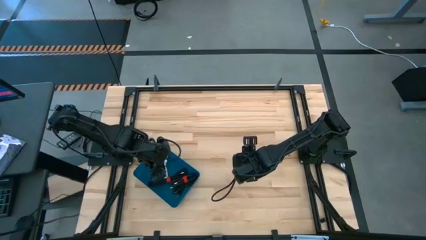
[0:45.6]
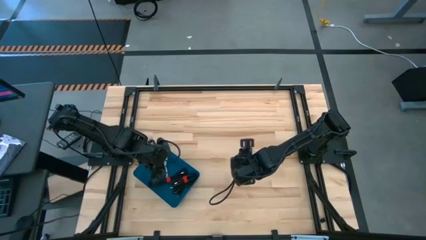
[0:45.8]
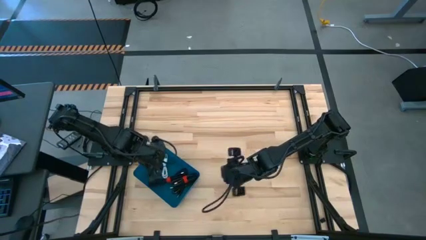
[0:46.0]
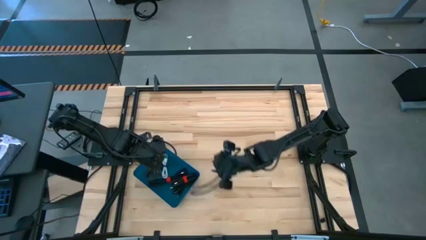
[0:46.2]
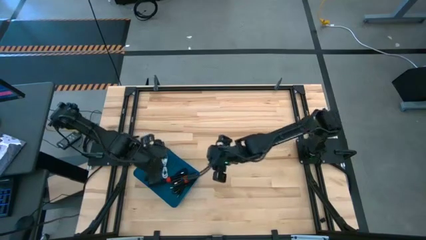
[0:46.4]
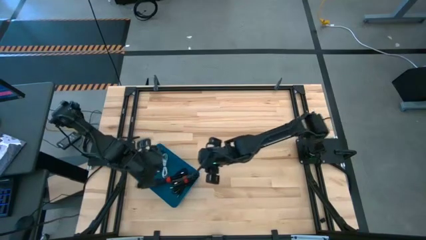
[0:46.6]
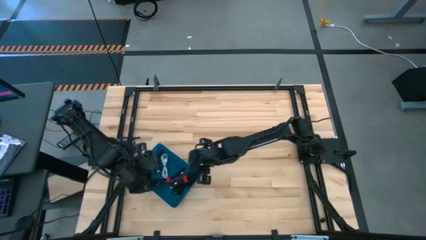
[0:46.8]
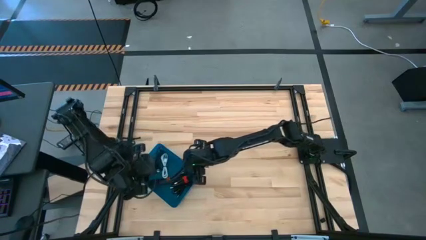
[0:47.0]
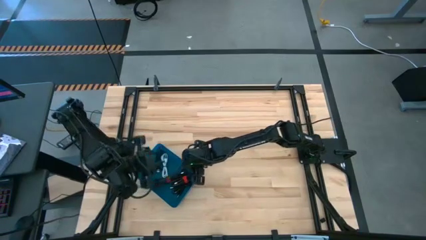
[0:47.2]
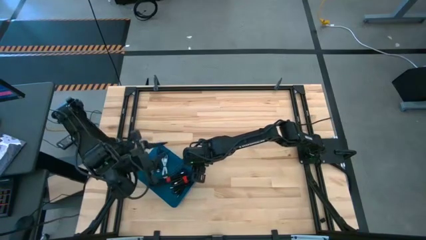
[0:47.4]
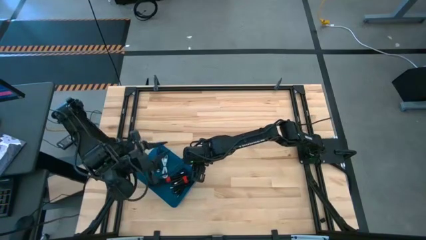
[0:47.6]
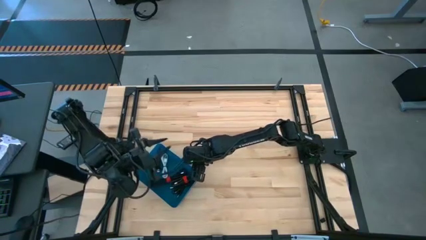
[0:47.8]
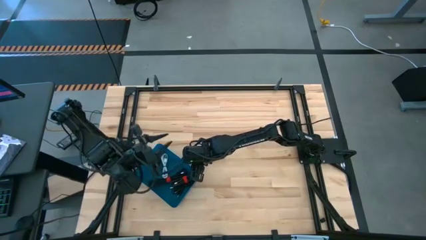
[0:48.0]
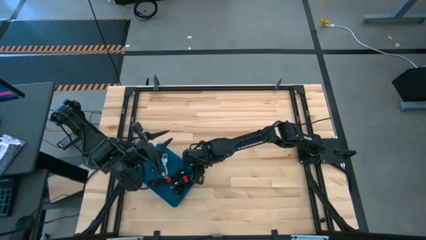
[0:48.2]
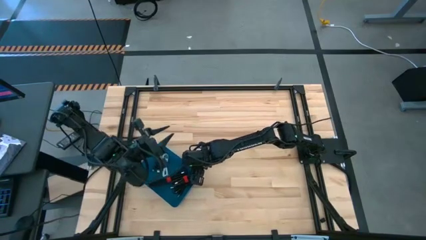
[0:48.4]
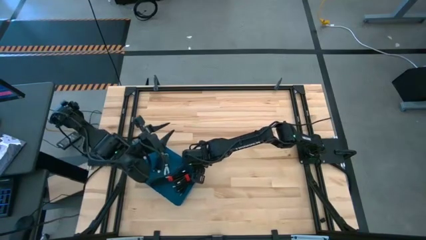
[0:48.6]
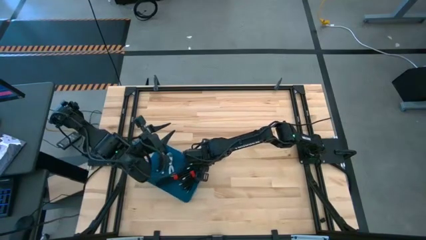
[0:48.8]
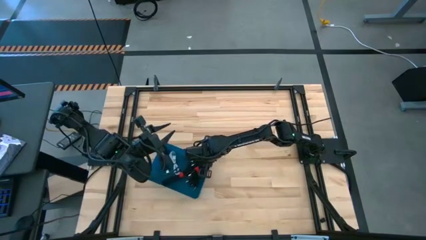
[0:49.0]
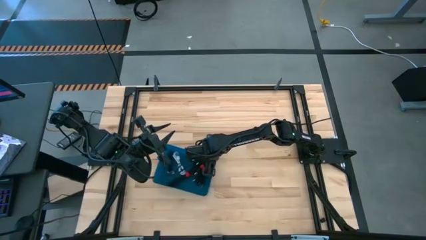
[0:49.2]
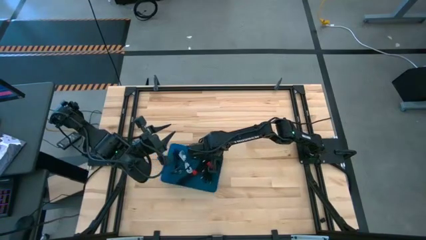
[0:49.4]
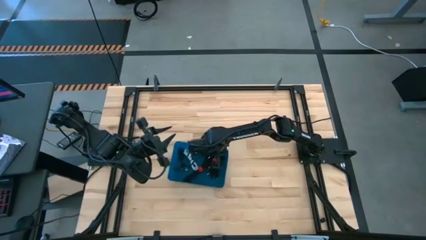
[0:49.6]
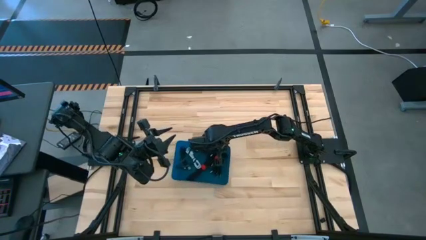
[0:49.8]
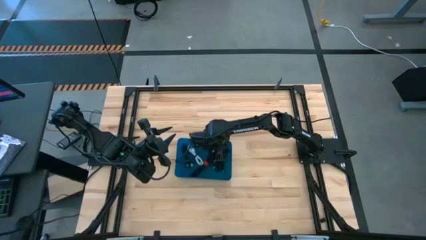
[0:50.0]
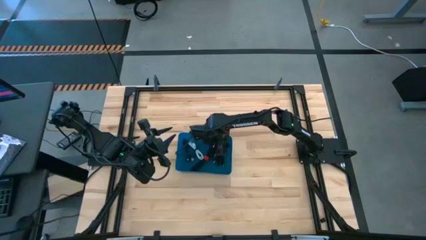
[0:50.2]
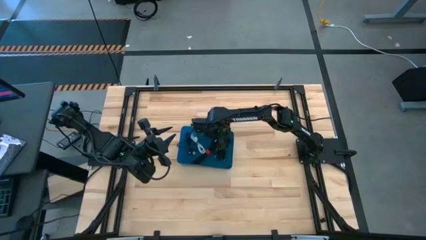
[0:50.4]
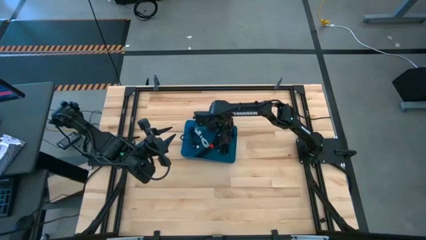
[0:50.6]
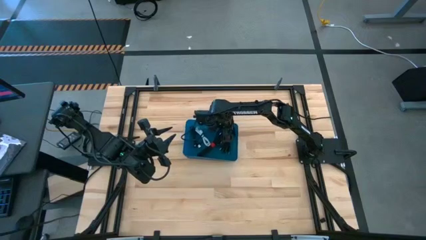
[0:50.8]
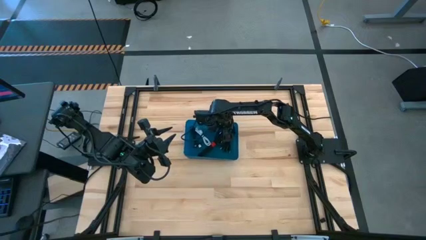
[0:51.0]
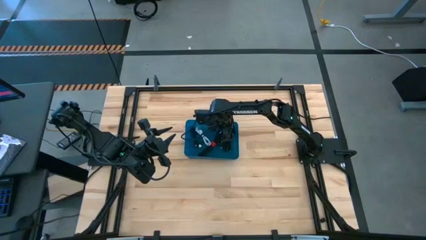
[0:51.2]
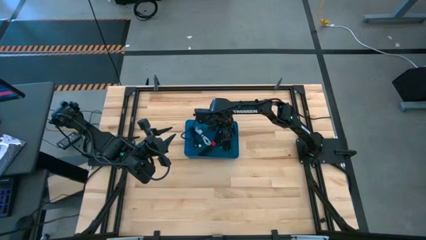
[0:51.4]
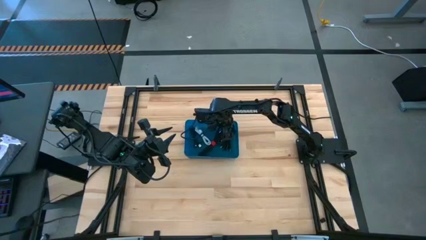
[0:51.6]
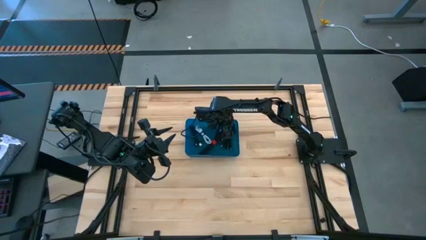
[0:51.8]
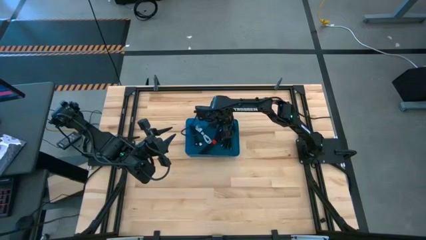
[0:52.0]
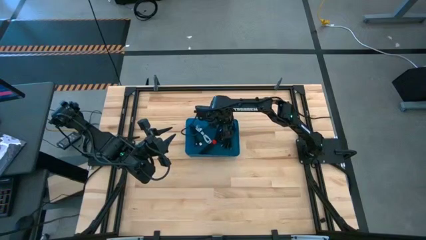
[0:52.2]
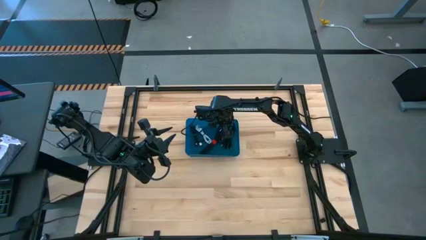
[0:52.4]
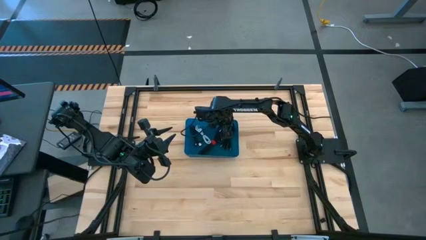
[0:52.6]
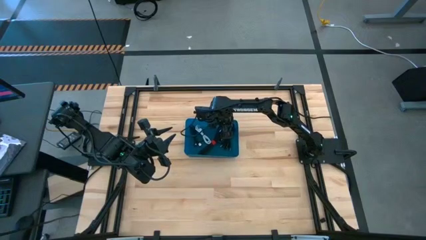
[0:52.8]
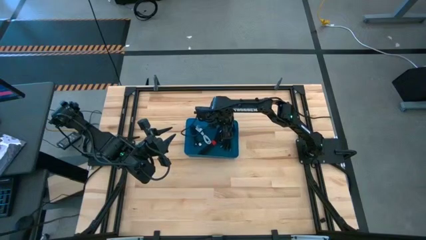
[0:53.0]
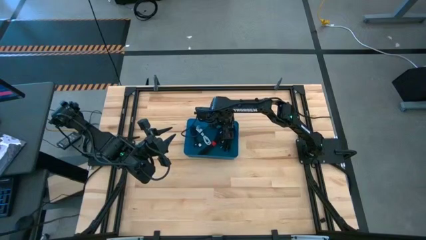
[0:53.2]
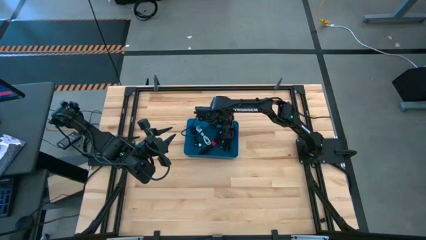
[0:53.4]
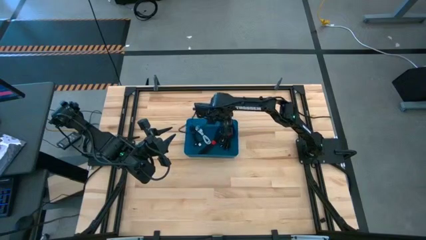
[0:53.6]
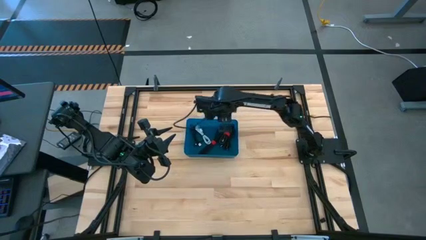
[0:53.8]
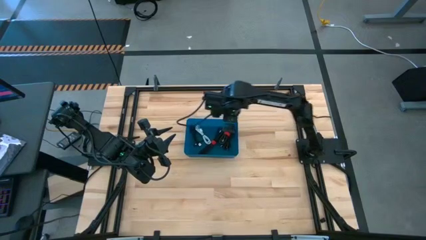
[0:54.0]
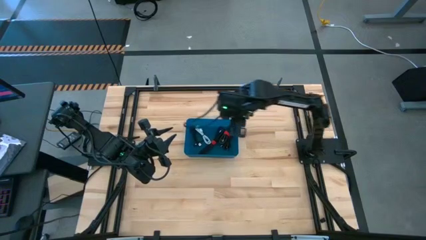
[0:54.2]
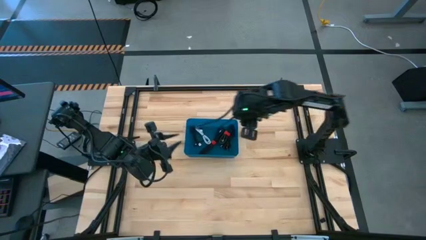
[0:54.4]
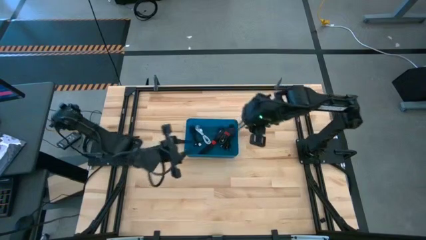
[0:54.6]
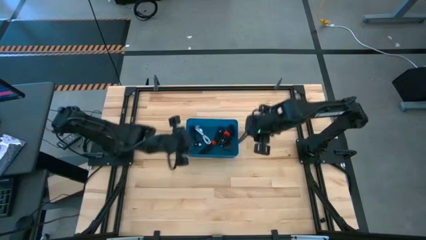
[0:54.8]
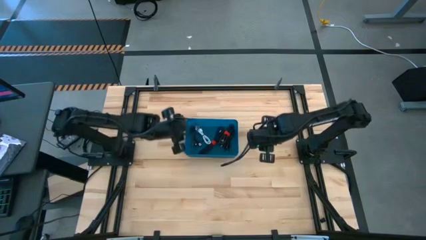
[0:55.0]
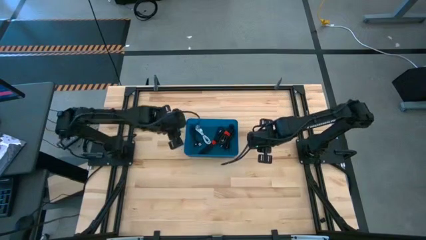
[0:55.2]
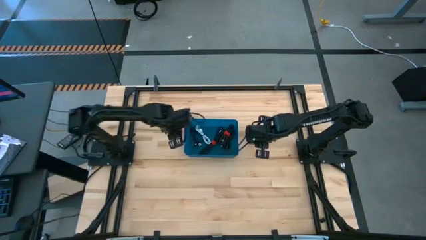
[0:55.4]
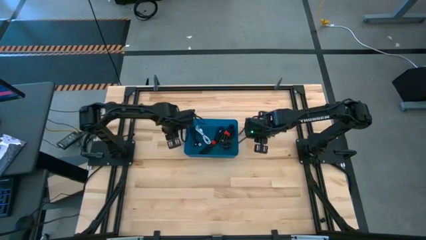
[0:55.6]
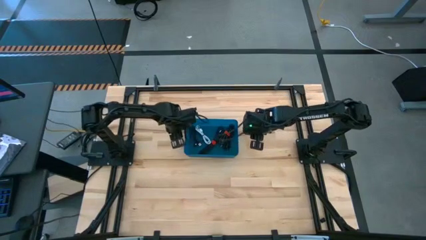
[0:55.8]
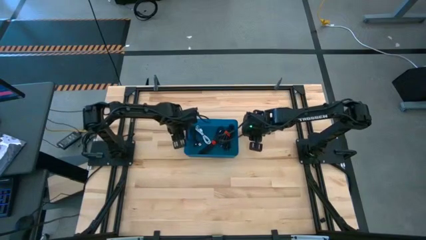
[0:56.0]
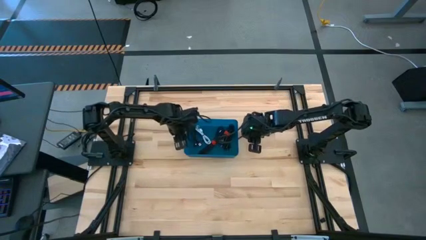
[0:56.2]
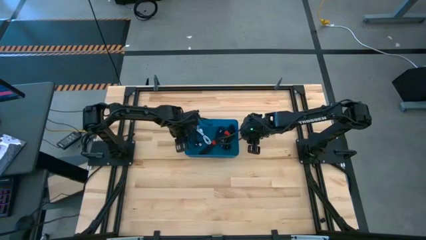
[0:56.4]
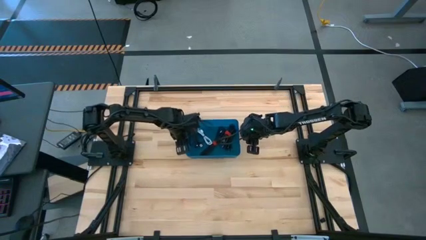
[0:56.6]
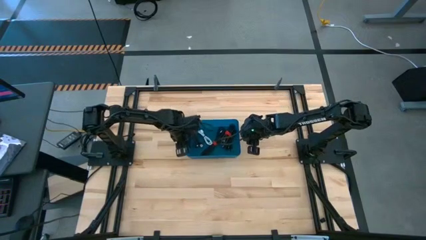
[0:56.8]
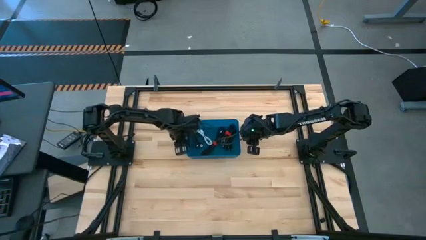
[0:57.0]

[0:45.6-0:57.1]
Task: Pick and place USB-C Cables
Move the blue bin to the center of the table

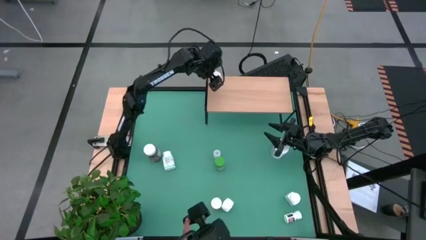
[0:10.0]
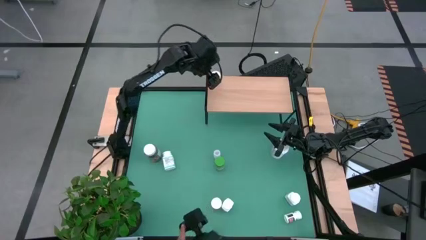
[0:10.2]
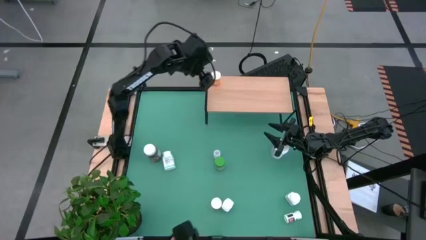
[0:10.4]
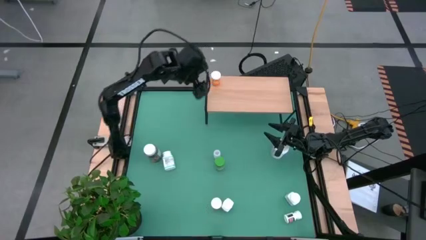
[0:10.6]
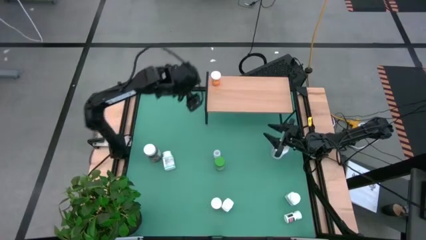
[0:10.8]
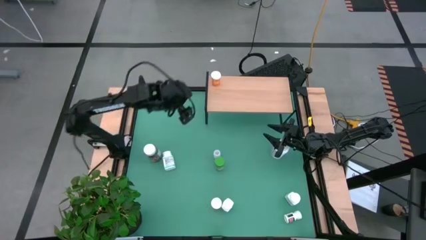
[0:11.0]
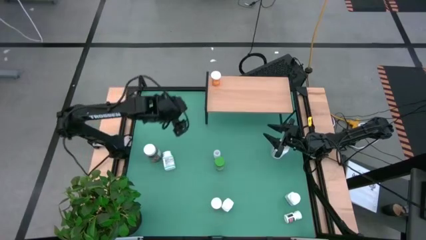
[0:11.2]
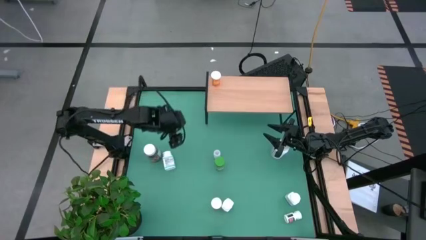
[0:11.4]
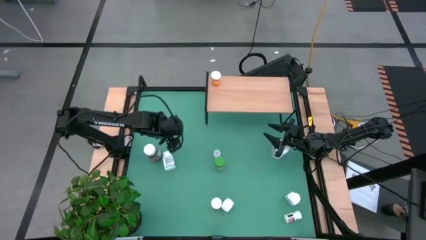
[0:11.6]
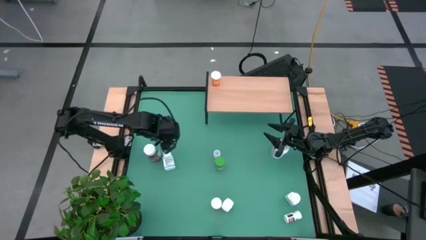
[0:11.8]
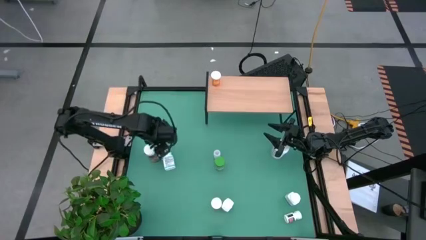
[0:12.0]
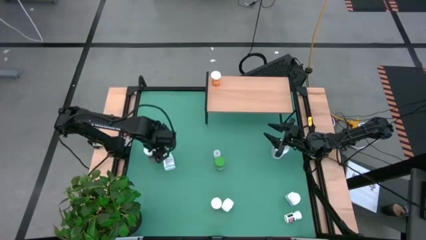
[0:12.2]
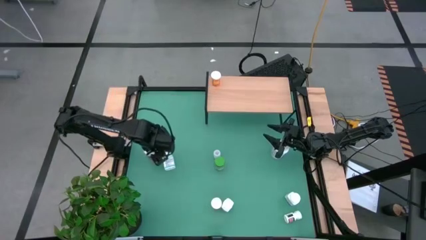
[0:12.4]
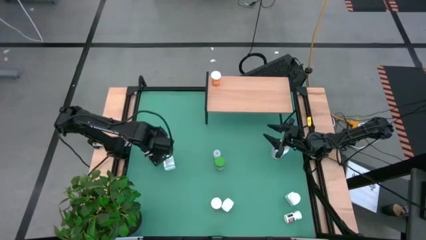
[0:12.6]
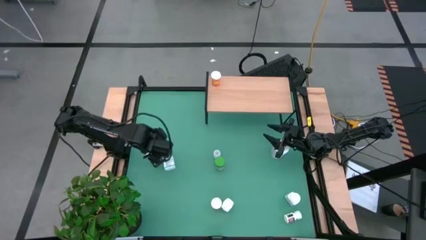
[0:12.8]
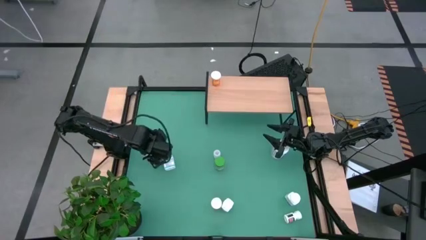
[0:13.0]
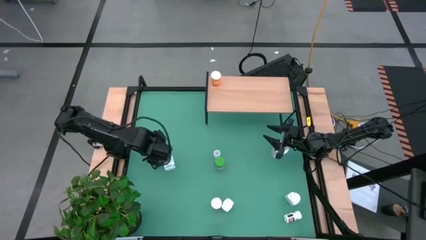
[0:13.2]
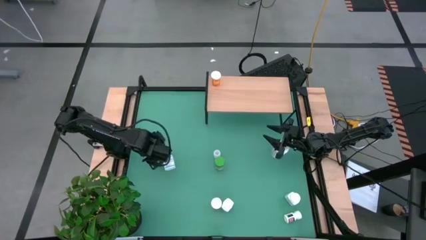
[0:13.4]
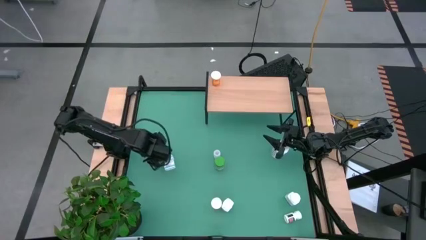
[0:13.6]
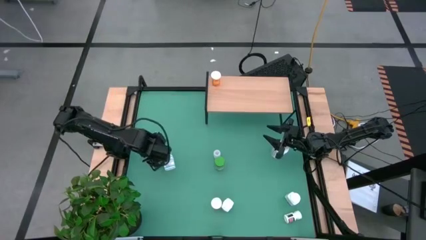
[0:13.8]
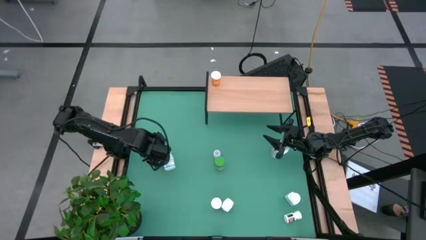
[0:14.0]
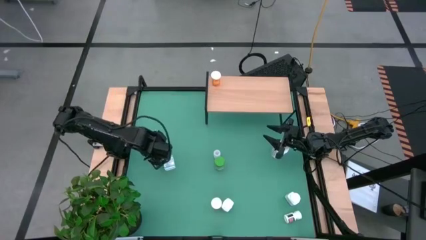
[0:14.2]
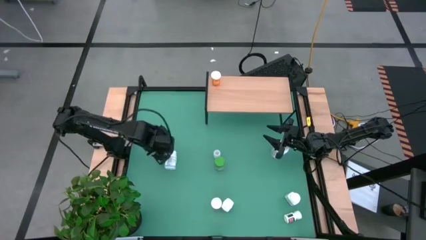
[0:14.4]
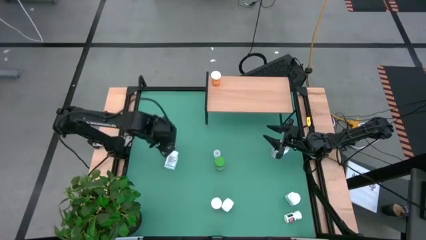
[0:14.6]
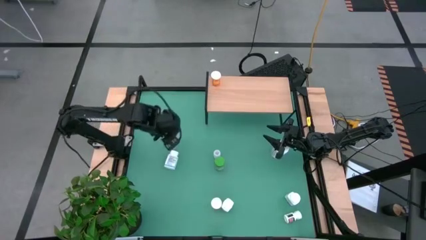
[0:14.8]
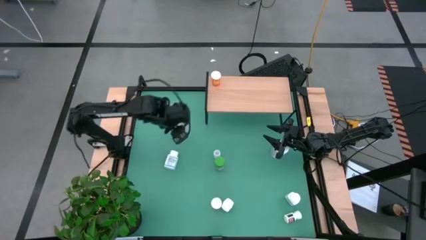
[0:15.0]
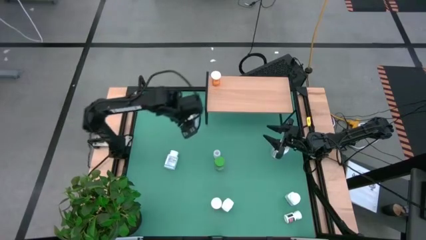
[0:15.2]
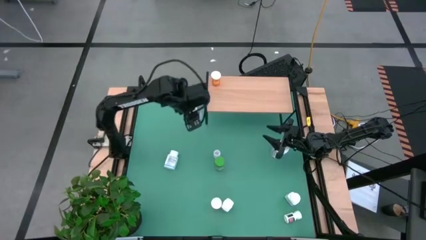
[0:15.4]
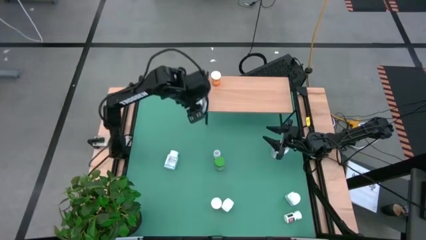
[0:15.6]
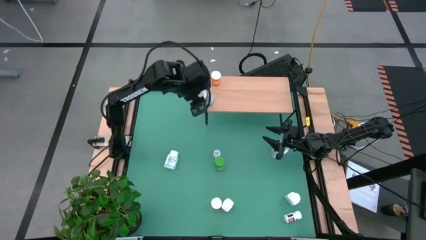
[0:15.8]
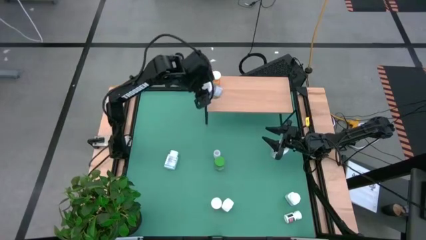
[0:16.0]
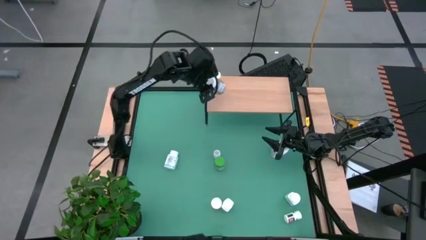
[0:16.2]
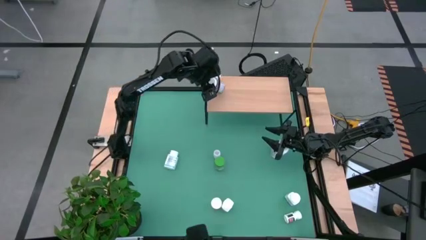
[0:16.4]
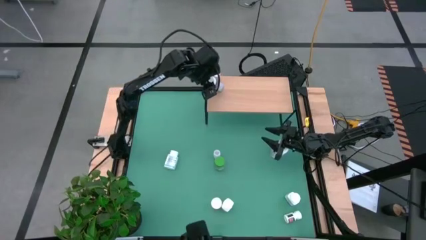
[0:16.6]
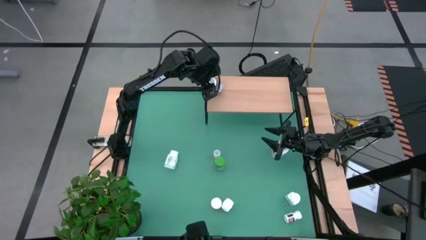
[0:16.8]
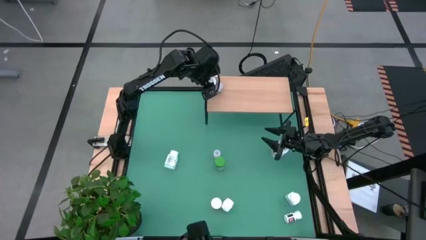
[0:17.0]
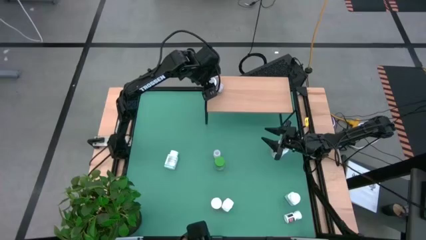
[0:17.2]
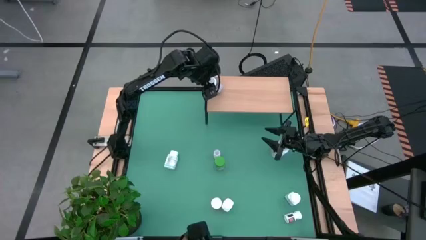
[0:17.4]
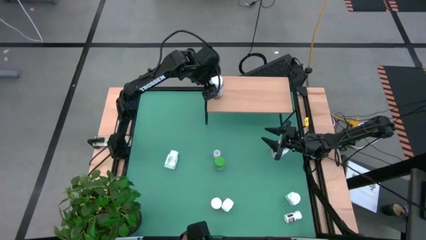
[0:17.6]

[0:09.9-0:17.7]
Task: Pick and place medicine bottles onto shelf by color
Put the white and green pill bottle on the shelf
